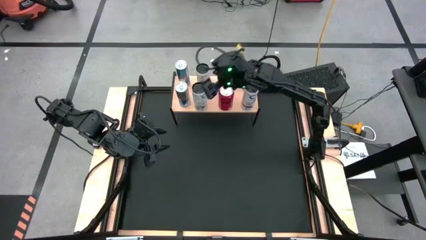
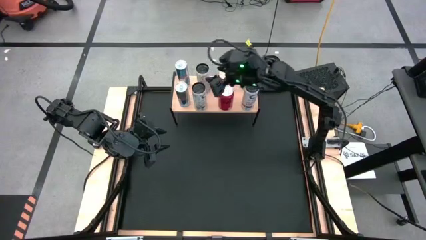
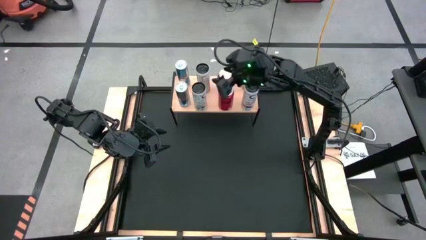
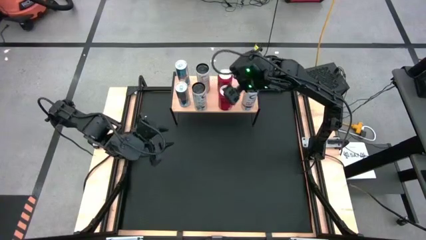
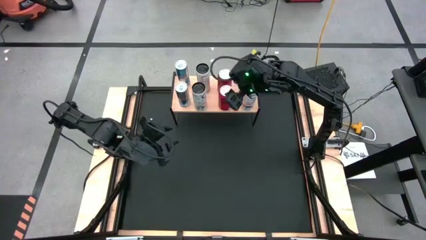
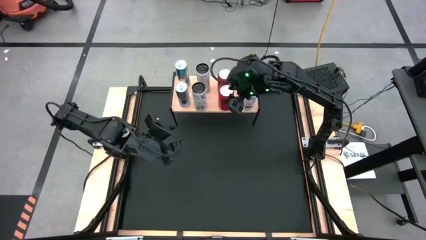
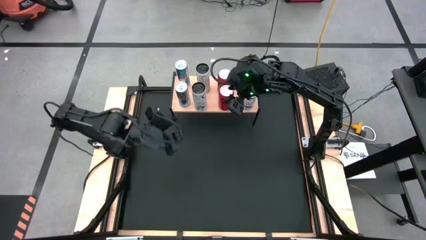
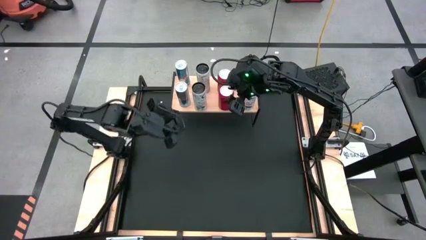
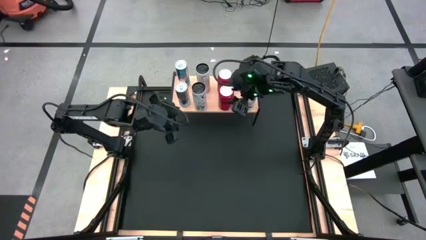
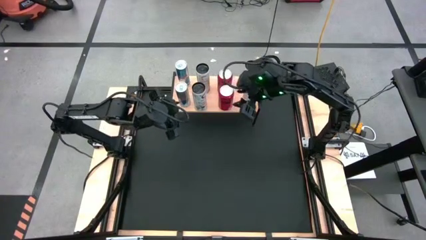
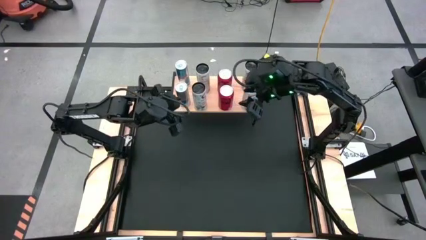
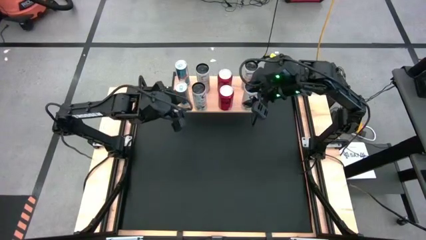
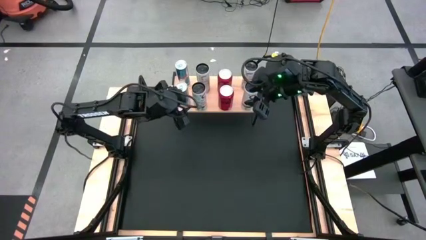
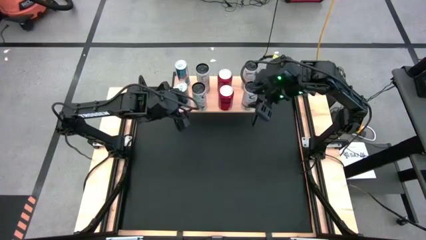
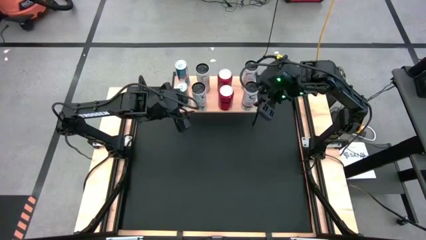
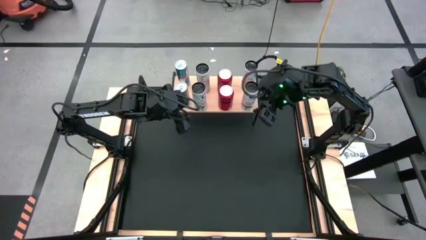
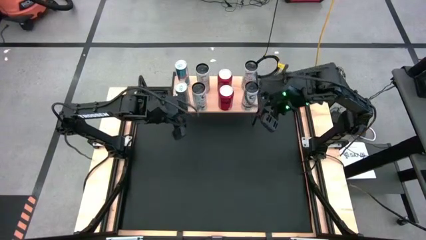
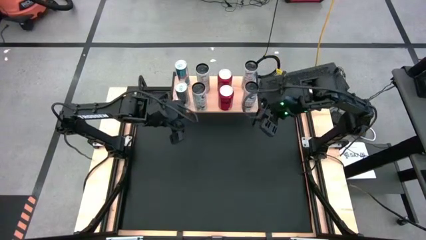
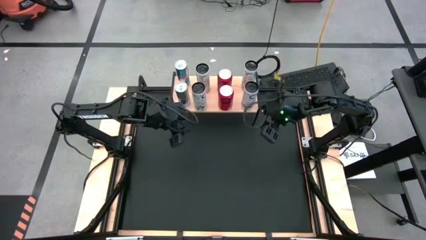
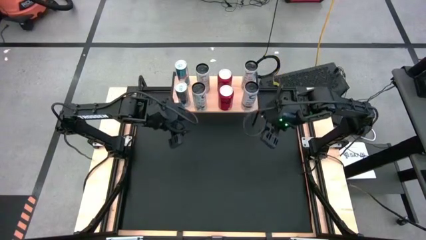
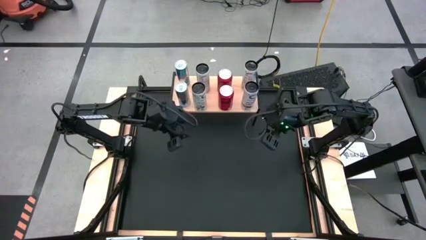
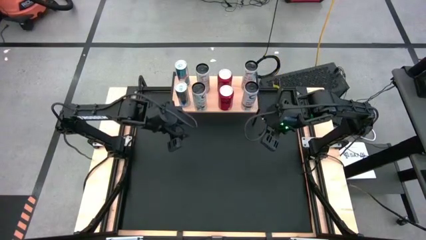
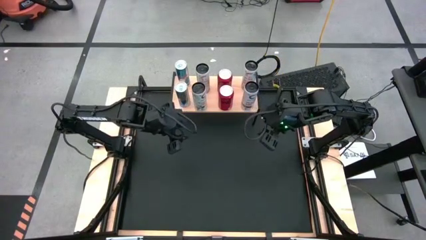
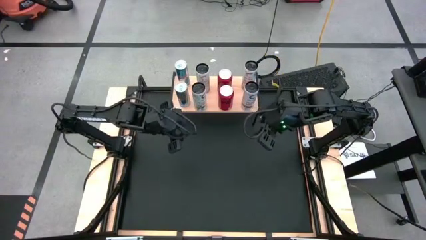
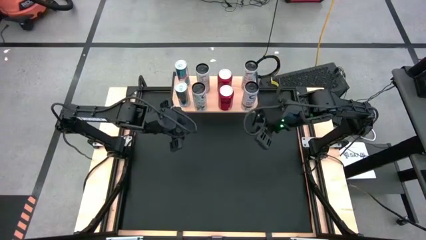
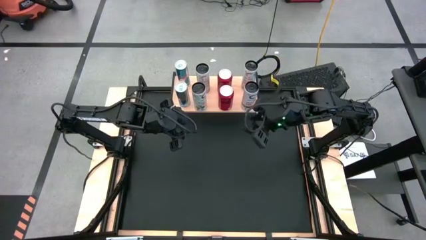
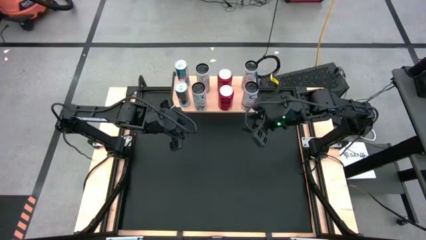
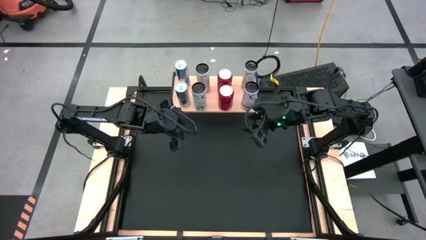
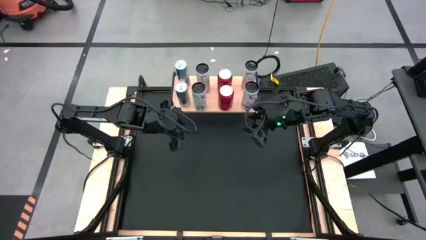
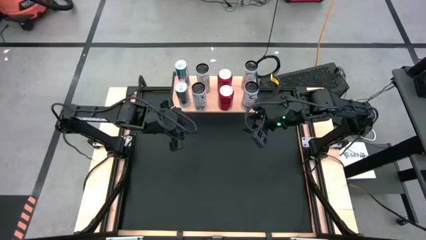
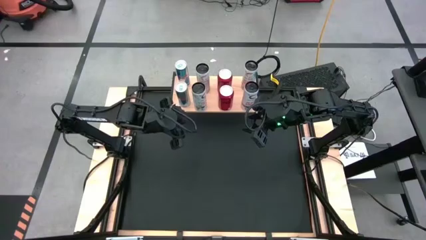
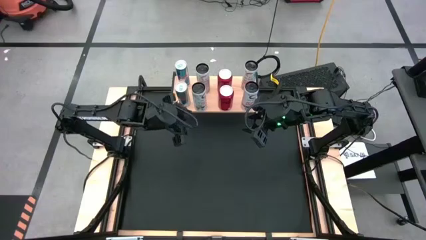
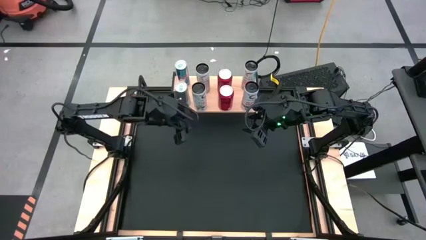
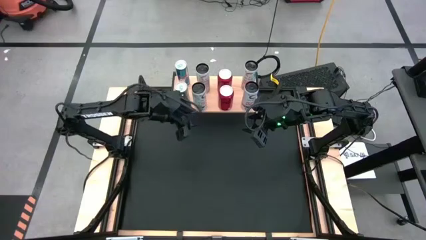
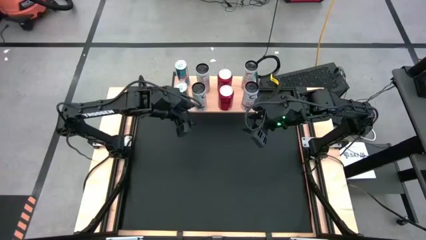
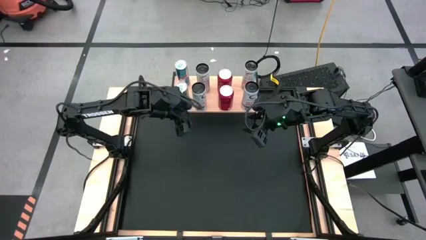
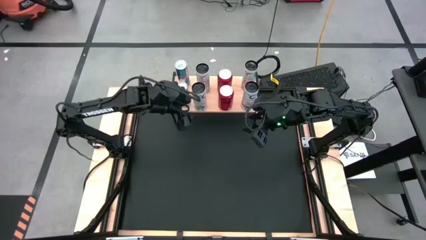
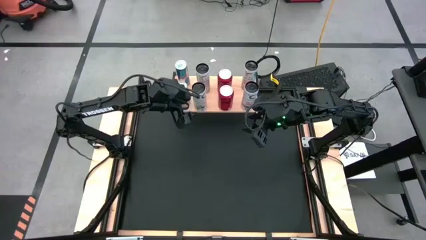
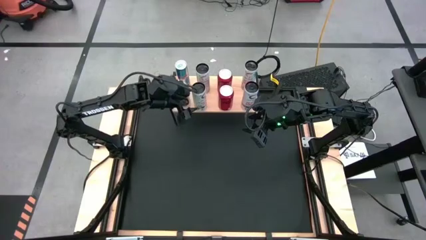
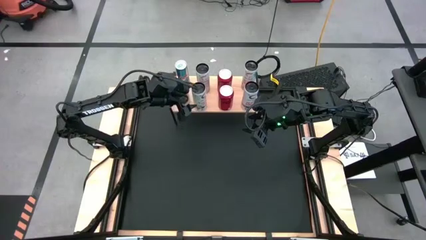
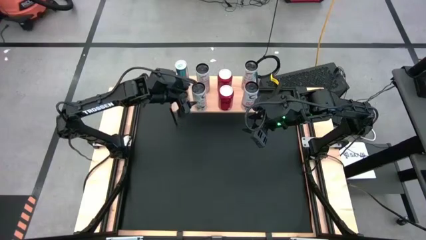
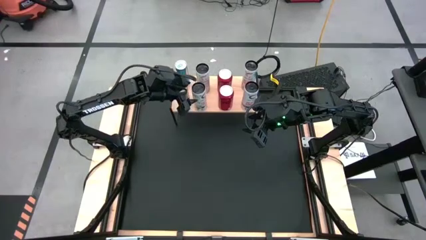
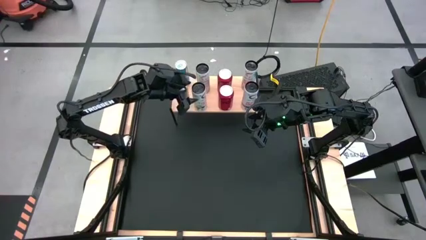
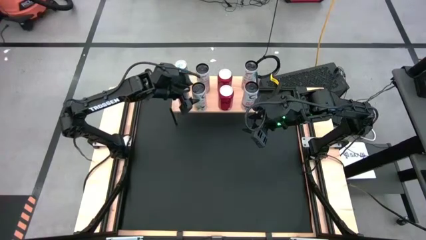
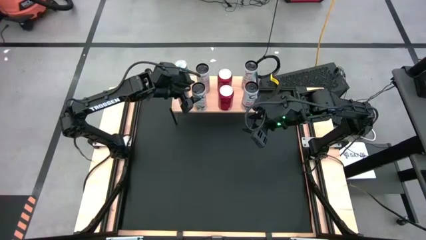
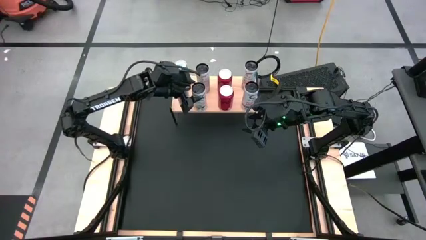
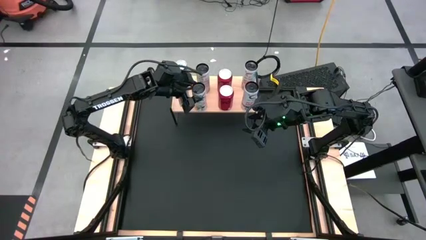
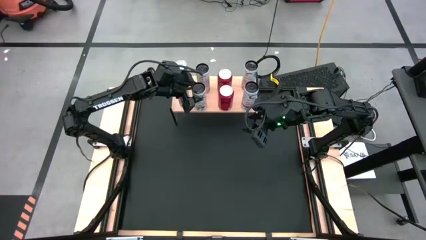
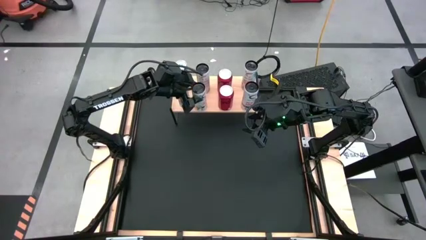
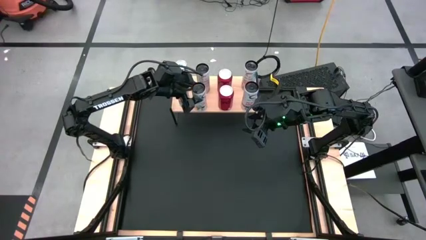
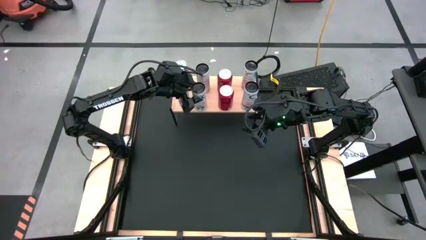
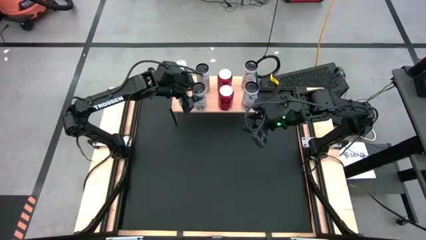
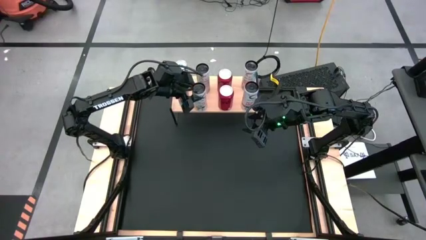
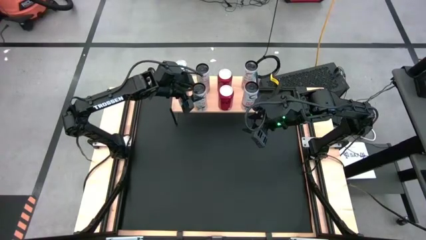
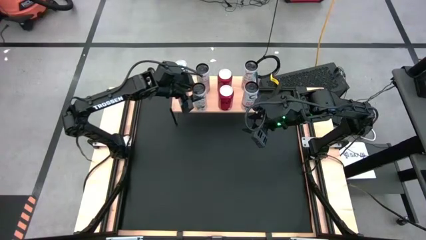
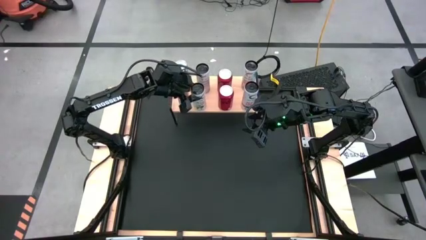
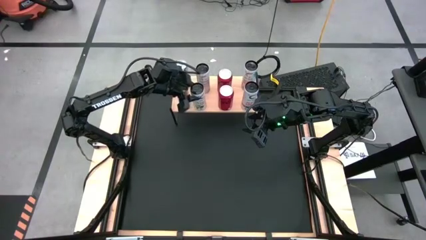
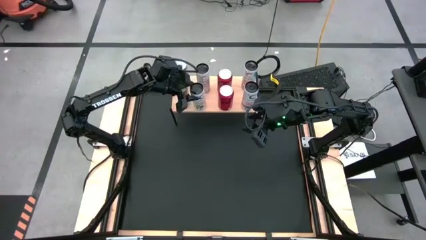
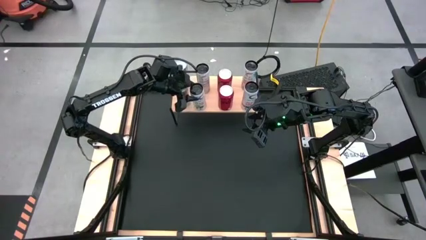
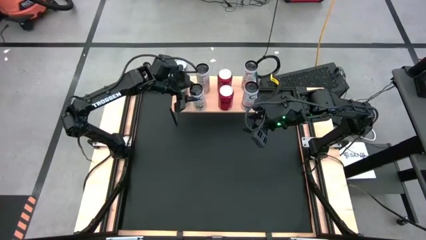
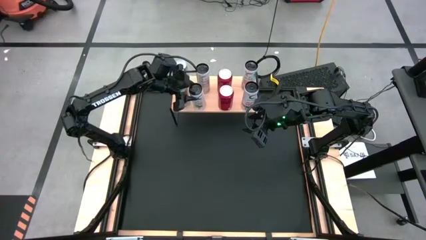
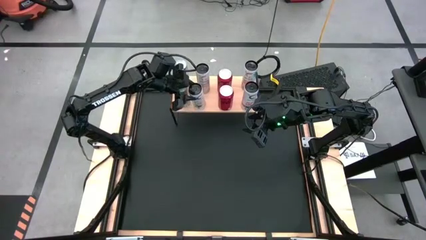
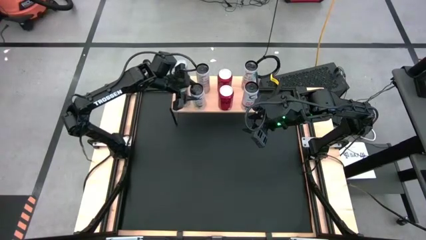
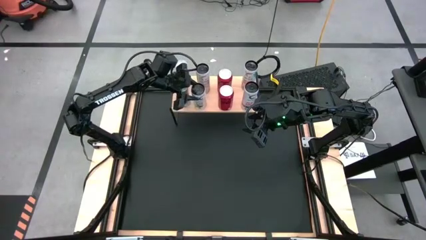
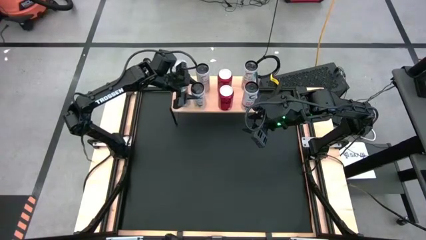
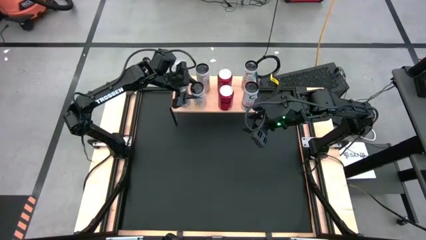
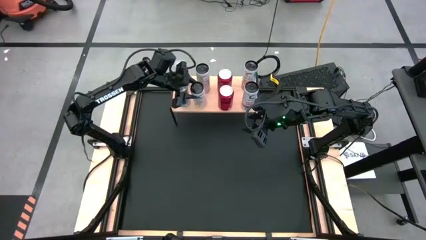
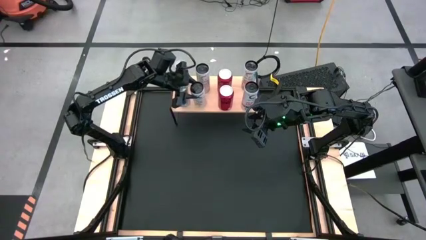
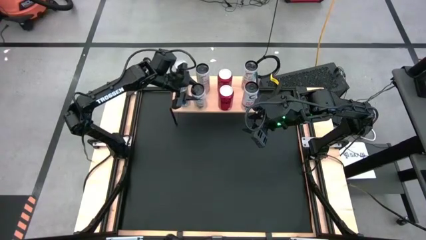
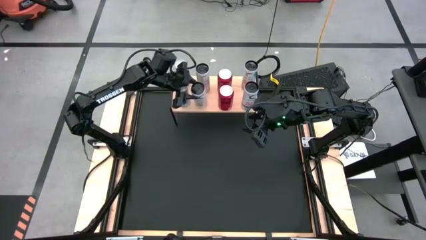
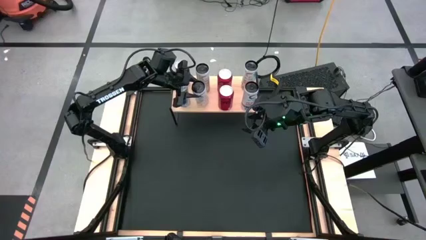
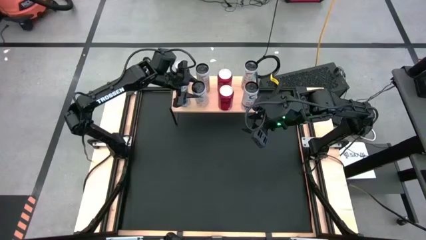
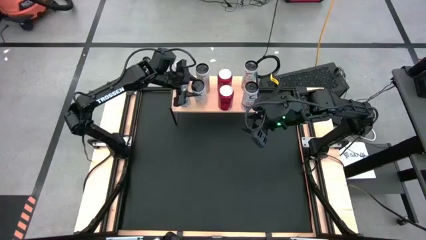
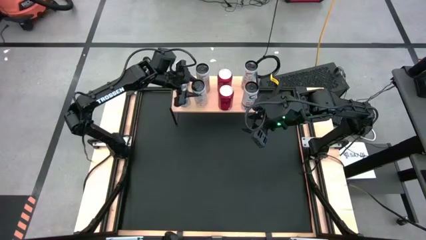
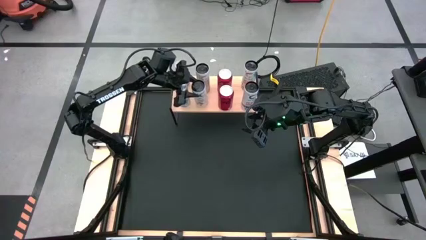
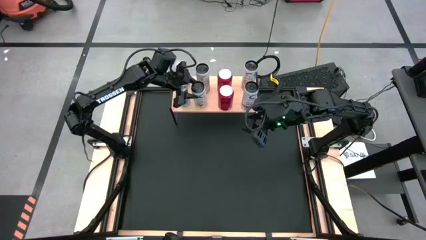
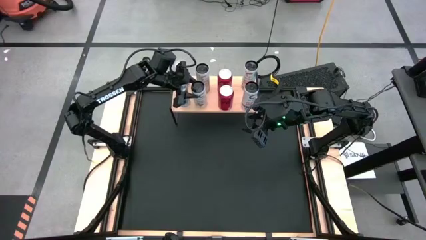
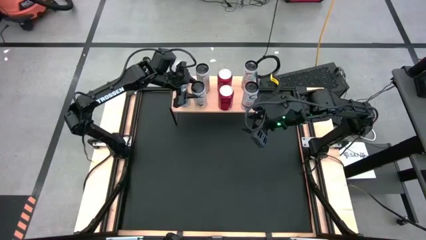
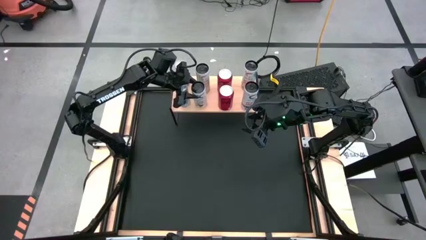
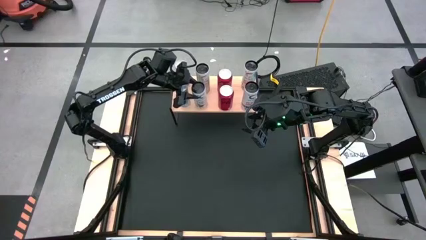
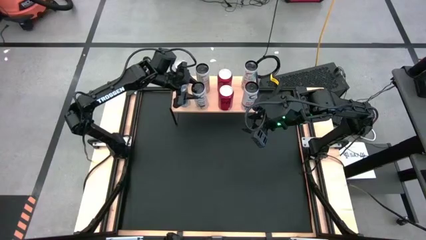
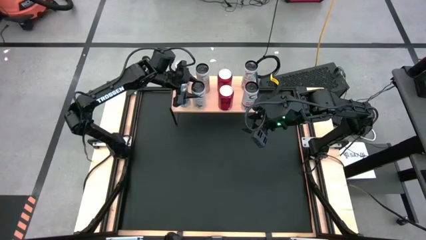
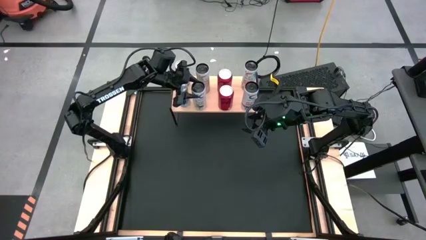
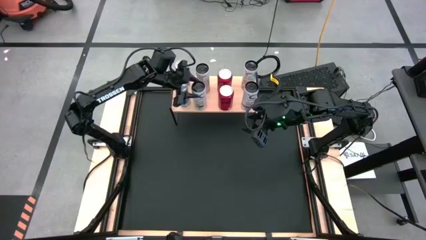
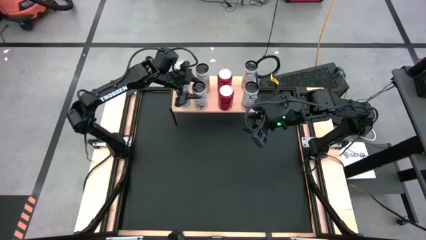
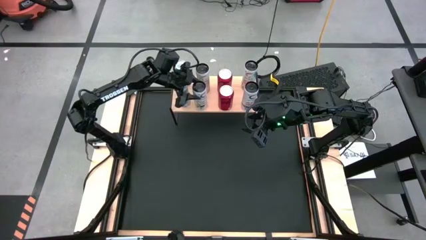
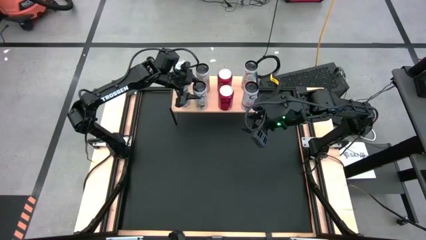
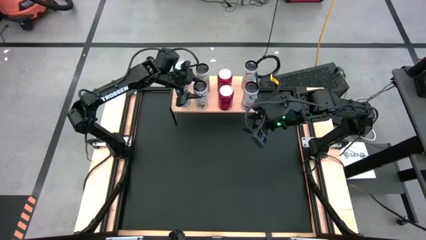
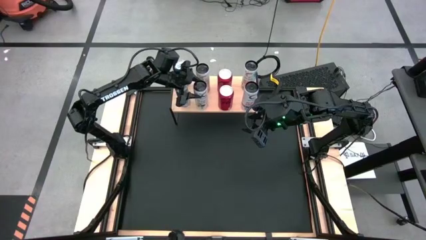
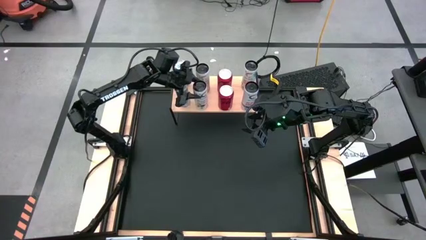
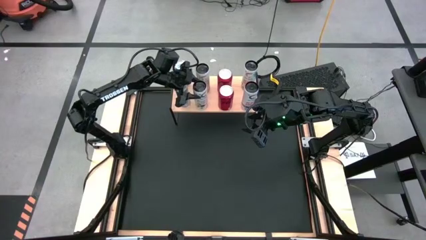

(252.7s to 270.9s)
Task: Place canned beverage on shelf
Put the white orange soda can on the shelf aligned with the other white orange soda can
